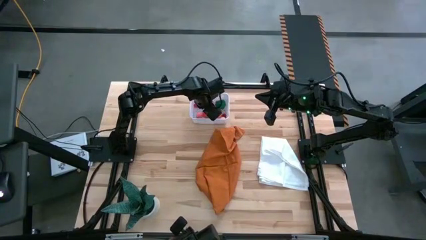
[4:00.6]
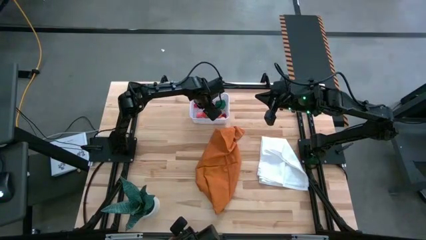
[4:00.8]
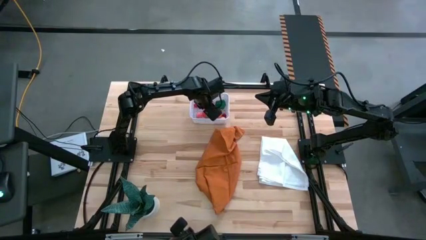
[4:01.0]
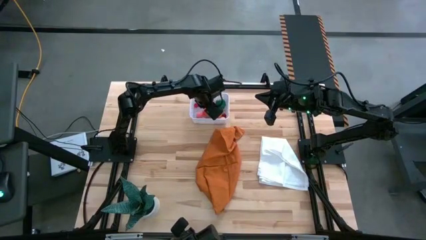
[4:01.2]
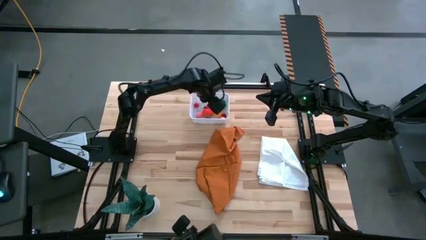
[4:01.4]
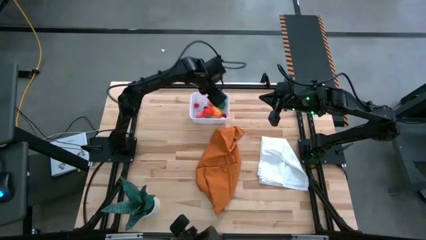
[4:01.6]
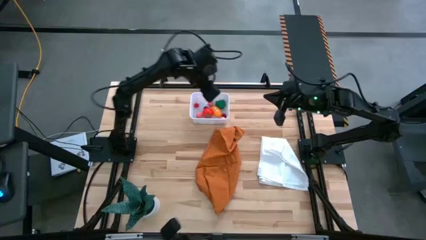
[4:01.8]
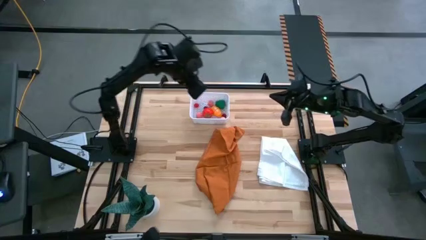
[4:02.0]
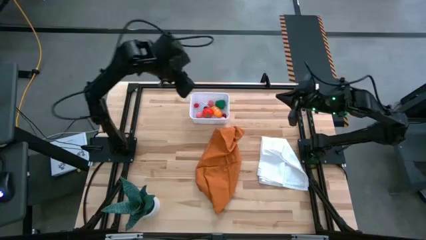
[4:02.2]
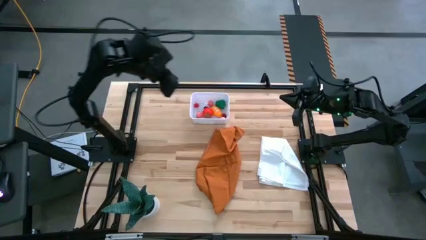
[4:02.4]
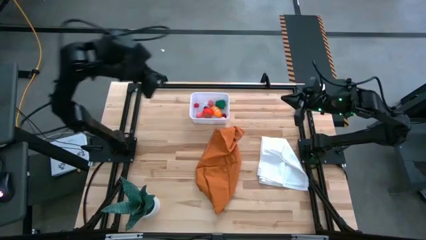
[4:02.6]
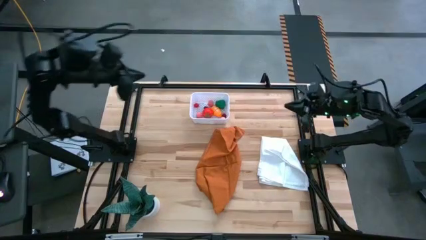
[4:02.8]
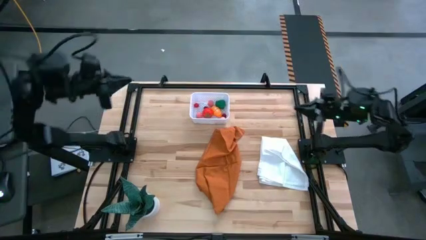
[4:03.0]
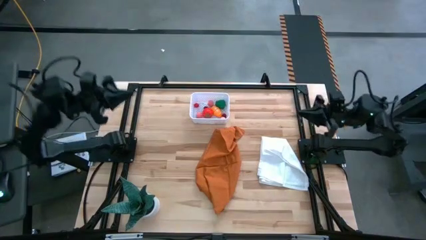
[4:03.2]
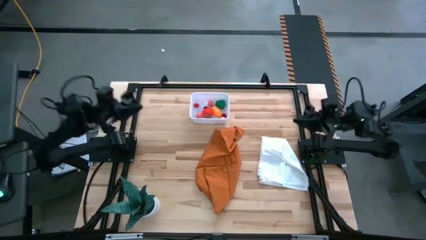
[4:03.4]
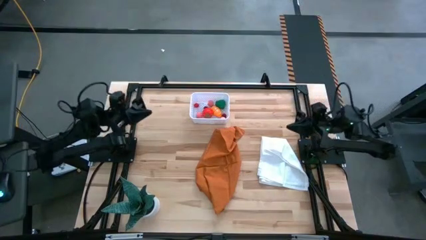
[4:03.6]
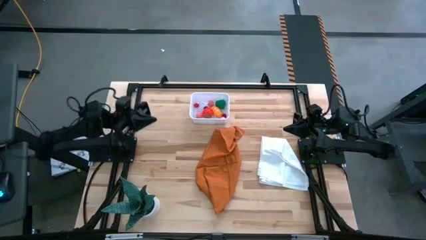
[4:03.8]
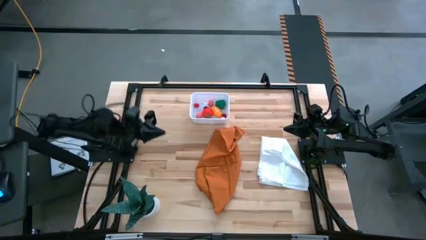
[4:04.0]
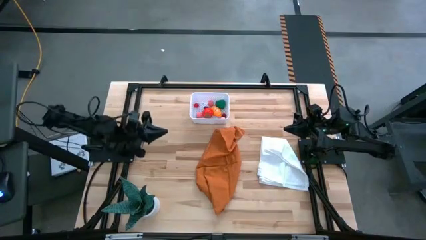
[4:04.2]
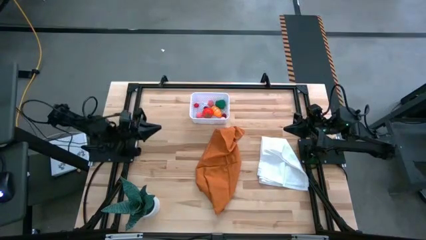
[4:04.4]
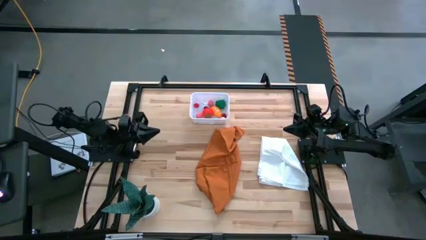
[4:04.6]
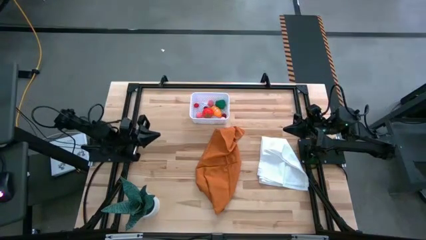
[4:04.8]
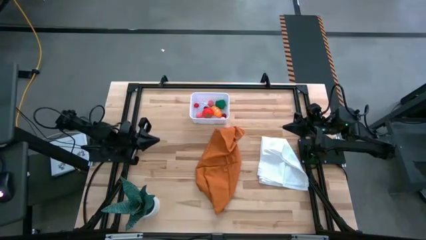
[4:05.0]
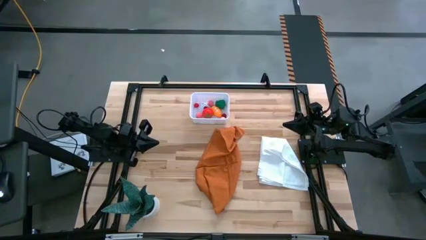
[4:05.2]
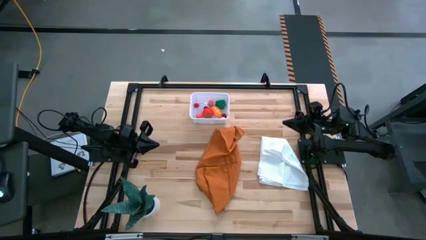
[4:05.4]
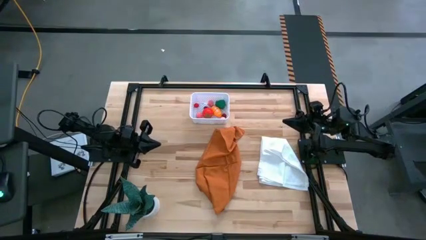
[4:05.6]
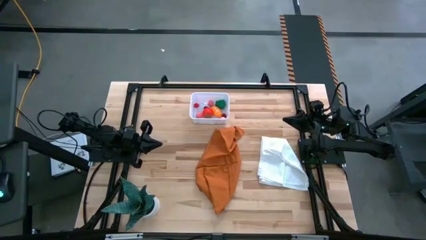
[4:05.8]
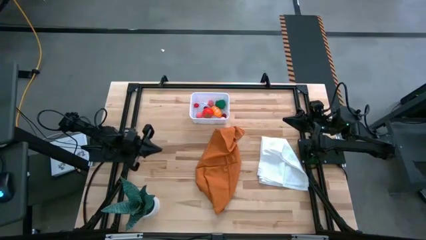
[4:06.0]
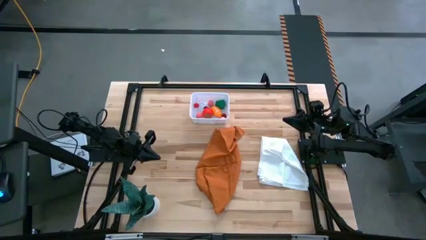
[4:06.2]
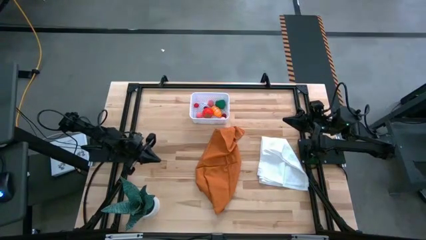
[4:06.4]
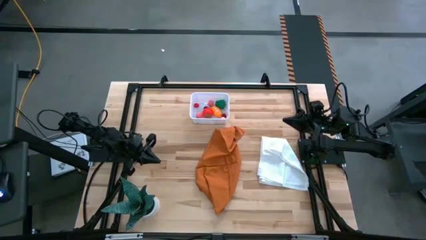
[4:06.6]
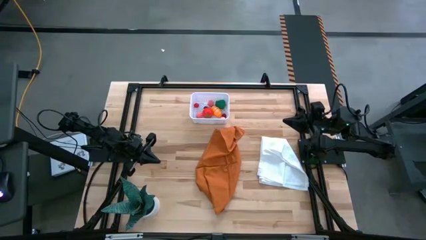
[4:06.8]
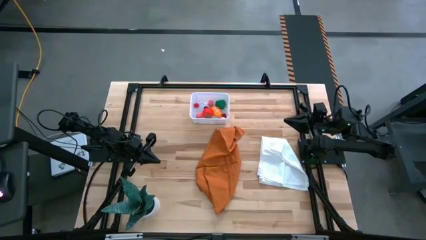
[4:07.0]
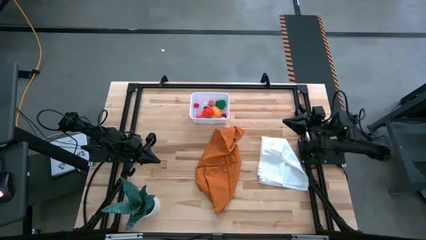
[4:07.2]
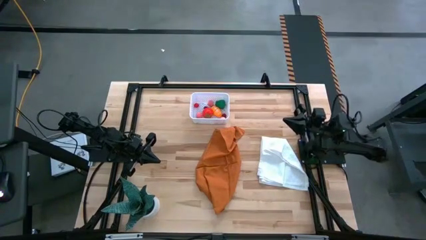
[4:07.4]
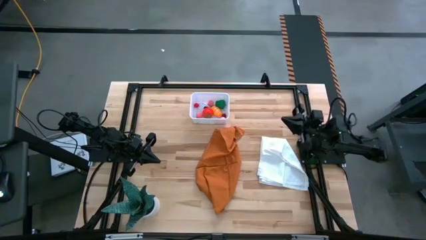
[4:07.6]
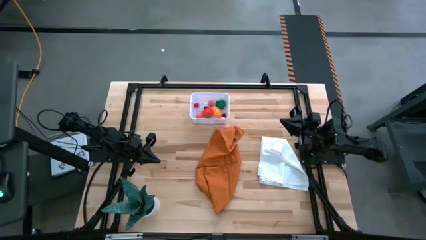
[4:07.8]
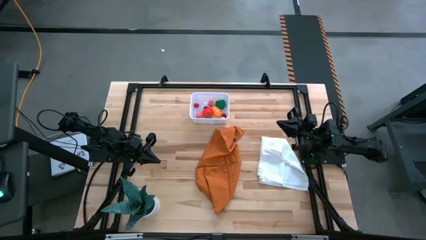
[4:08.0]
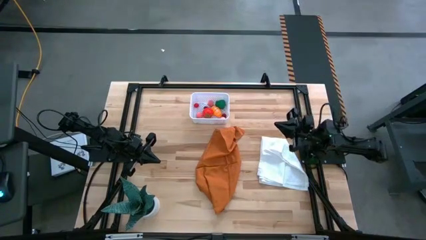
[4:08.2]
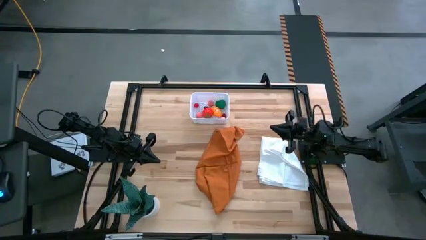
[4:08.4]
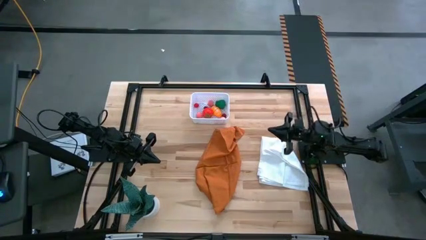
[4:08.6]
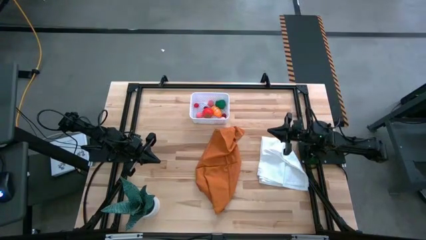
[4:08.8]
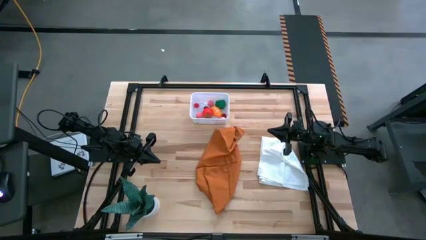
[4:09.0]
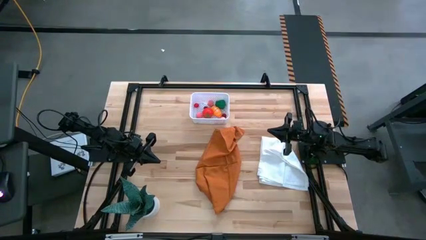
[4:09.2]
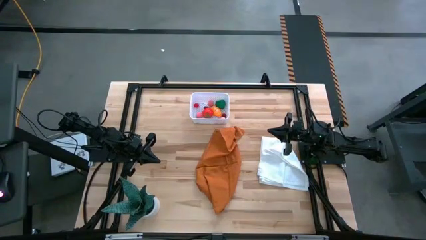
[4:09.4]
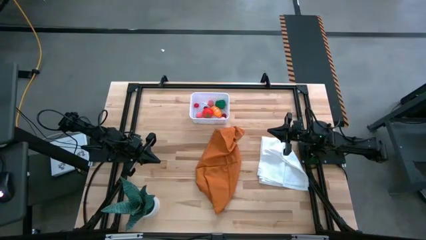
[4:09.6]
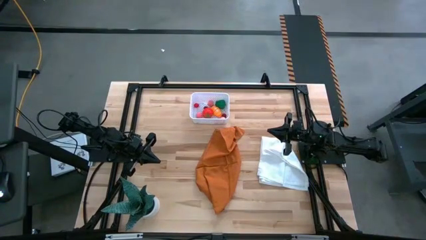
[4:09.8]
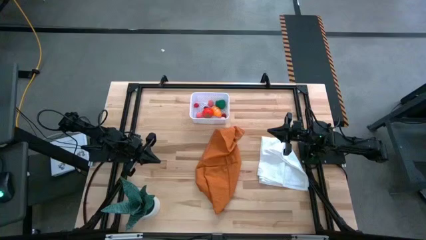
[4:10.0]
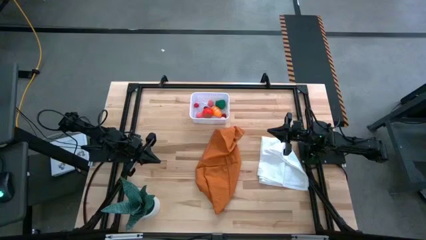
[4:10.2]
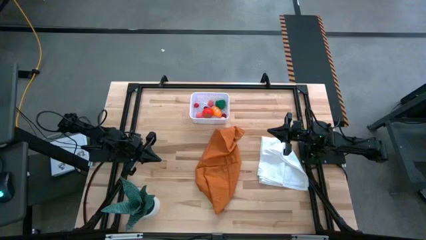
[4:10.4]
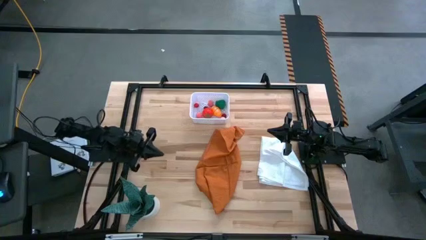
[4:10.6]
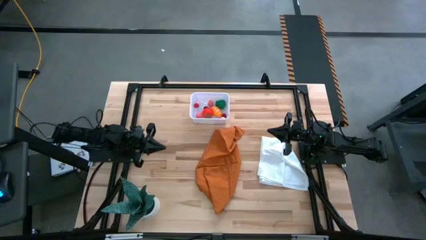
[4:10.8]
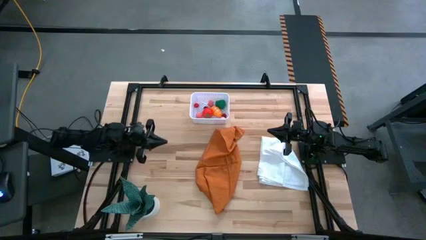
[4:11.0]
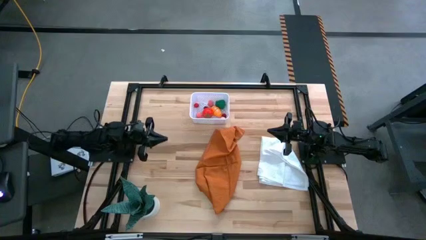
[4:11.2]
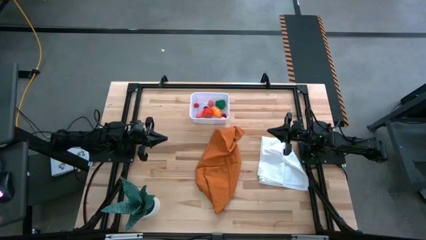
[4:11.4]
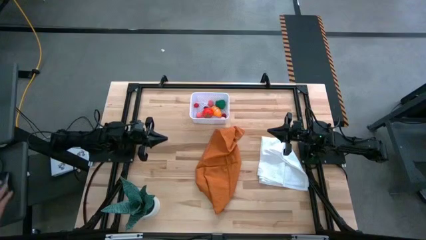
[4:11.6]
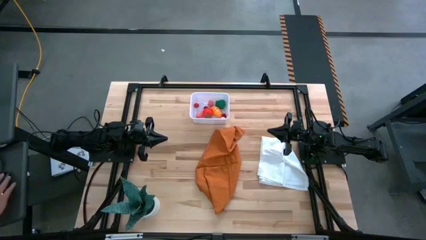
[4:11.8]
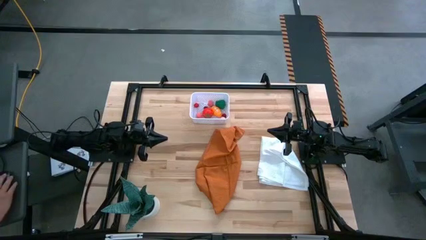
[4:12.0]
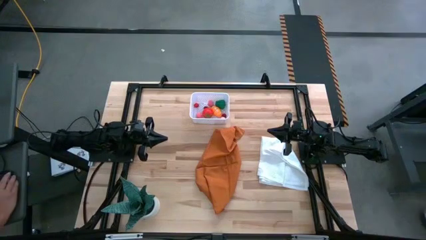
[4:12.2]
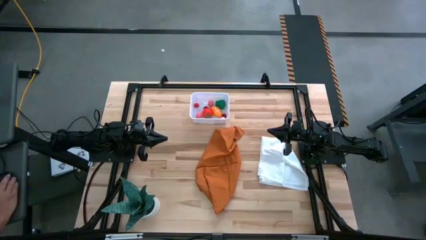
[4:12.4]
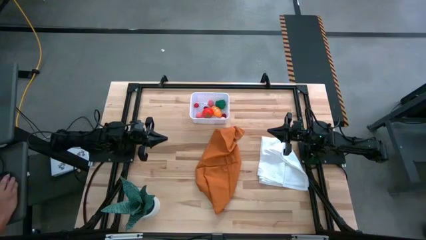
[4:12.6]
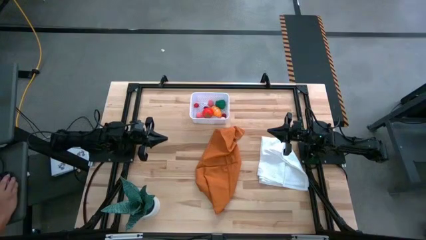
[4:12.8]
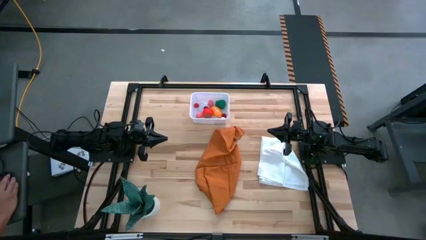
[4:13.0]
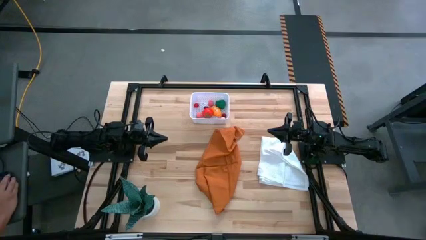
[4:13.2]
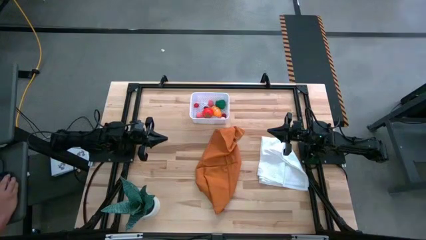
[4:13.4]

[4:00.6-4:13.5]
Task: Pick and placing Produce into tupperware
Return to Home Position
